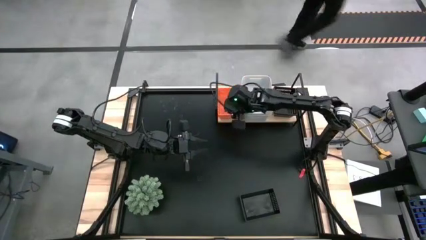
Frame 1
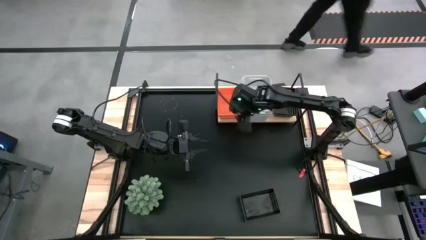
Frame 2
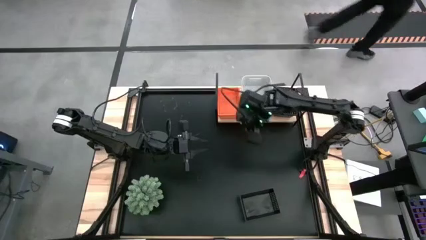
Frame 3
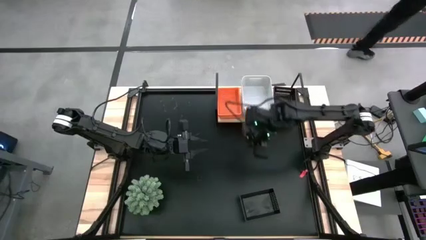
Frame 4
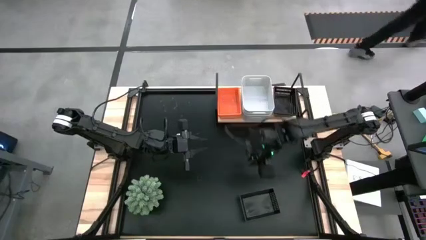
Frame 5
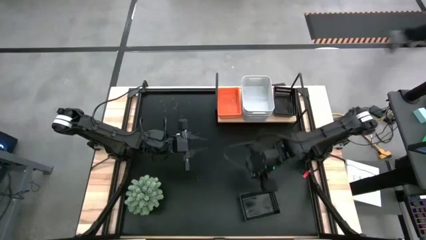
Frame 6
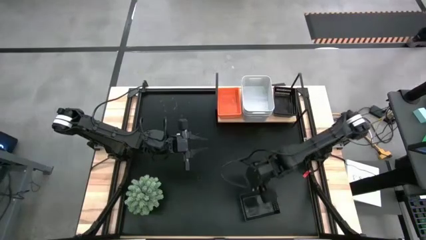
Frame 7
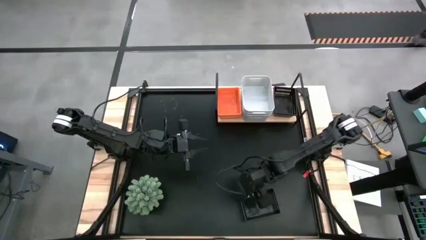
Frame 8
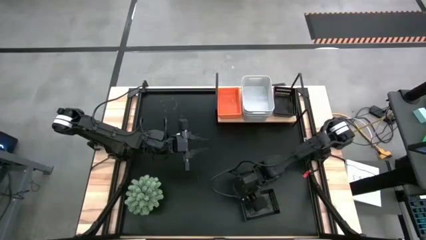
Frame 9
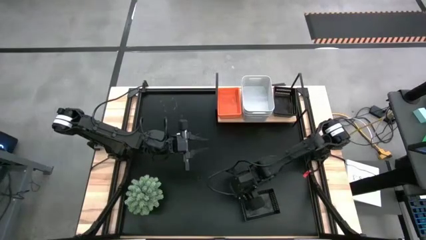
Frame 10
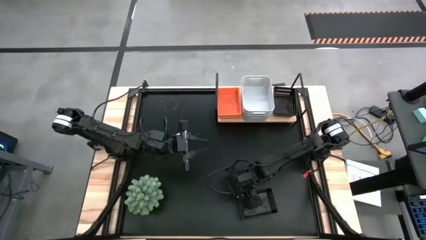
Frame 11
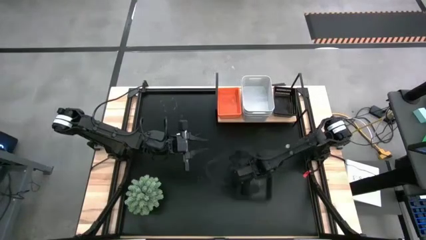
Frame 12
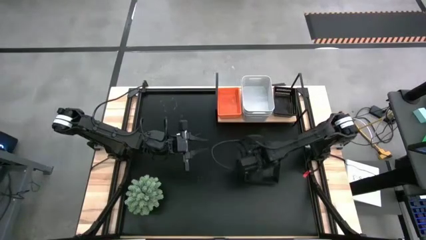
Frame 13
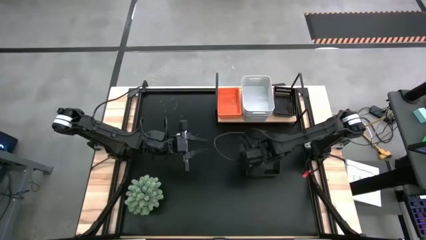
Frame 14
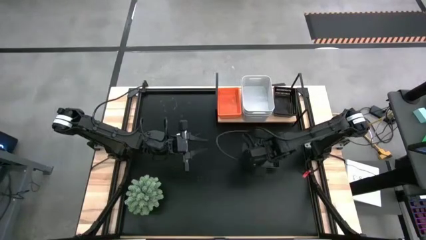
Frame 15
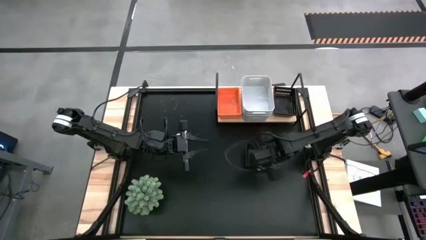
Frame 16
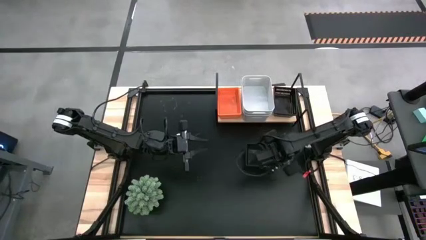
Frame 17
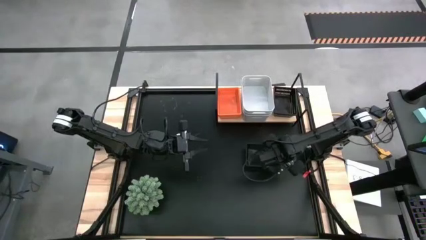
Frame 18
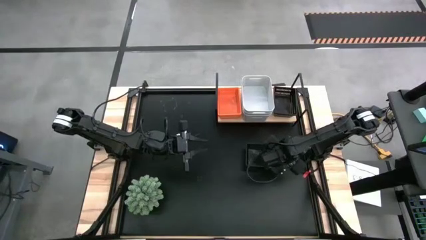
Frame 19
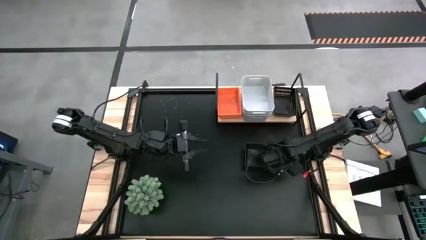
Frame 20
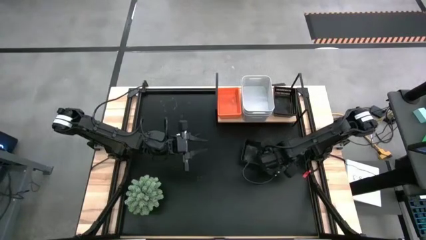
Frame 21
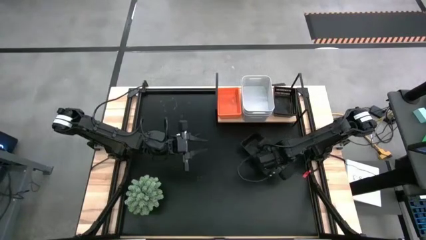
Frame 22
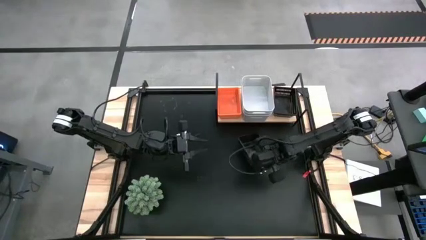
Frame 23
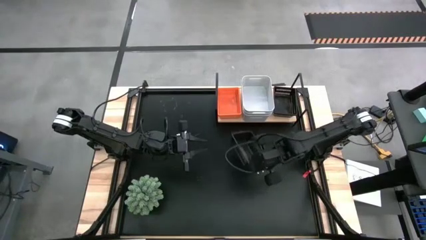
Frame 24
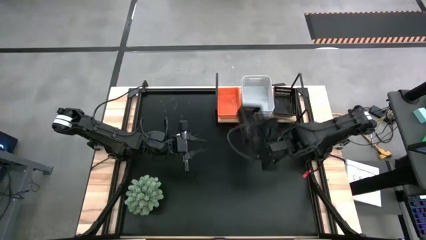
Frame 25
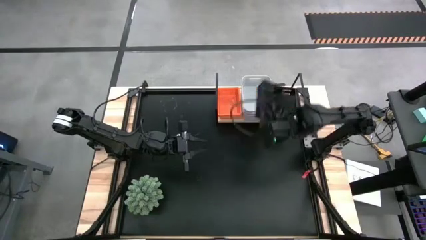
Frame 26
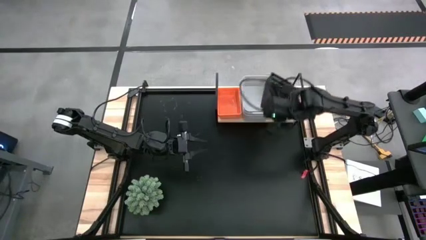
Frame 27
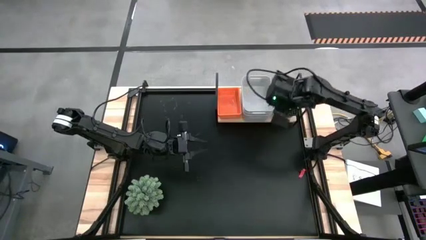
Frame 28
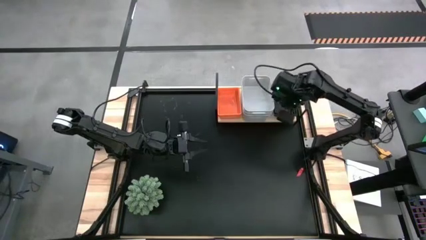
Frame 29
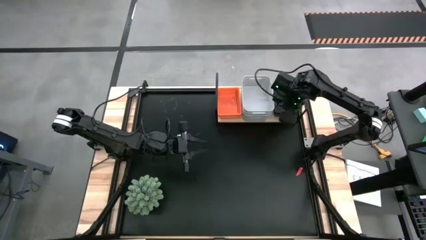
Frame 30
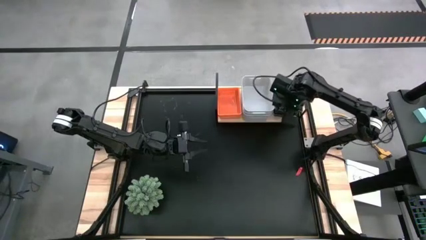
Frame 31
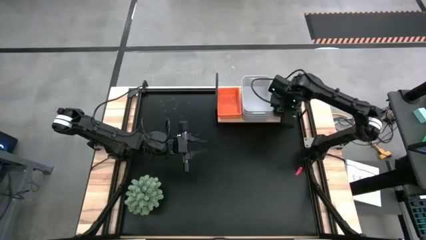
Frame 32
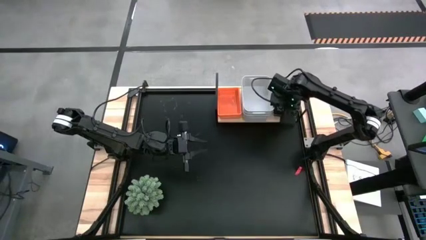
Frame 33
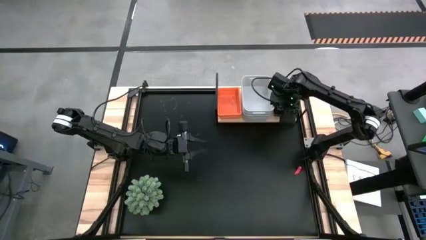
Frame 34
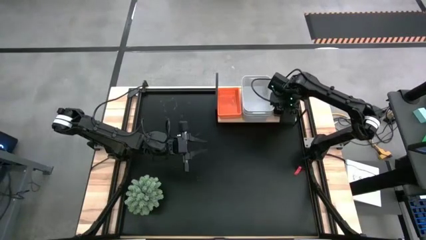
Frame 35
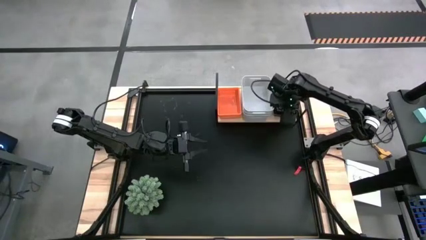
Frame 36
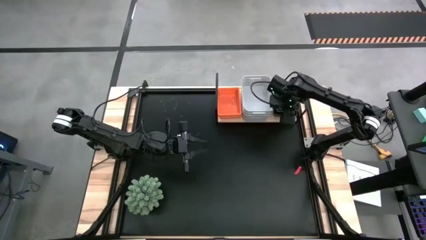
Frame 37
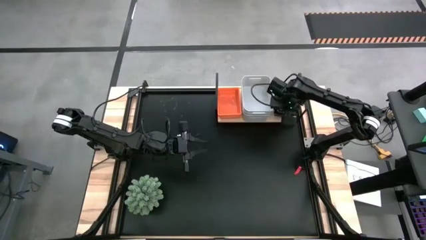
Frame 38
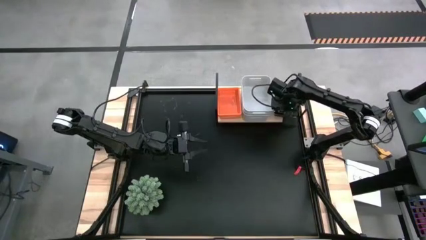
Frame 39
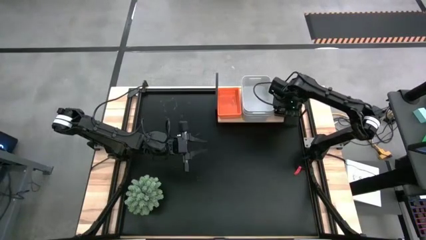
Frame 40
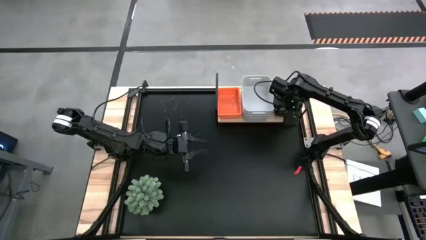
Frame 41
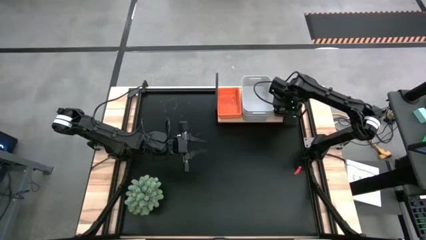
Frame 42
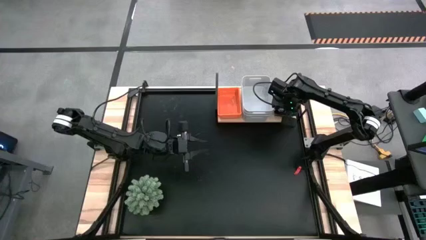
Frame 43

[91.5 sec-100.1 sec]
Task: Stack baskets on shelf by color
Stack the black bin on top of the black bin on the shelf

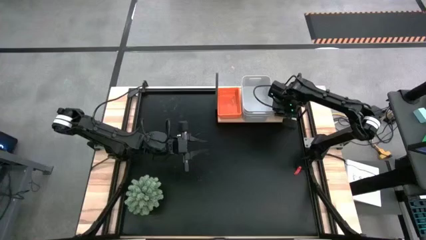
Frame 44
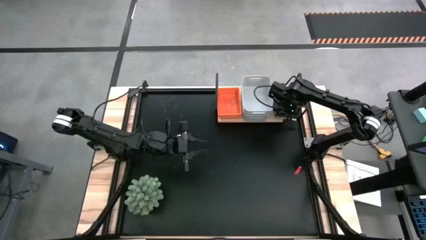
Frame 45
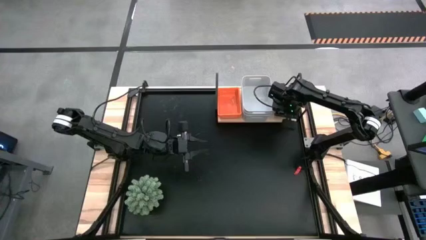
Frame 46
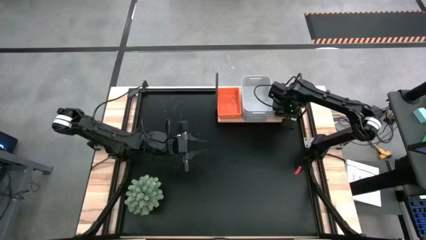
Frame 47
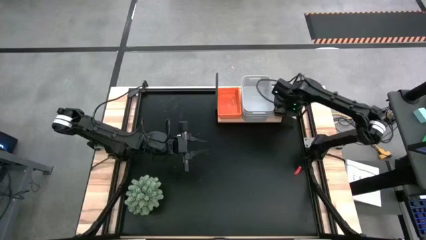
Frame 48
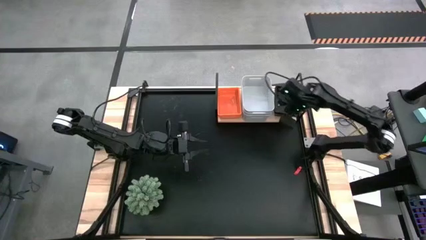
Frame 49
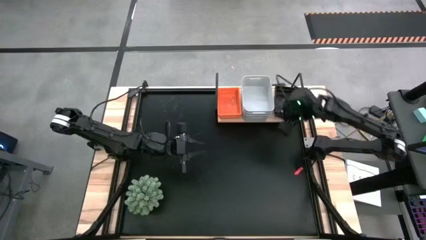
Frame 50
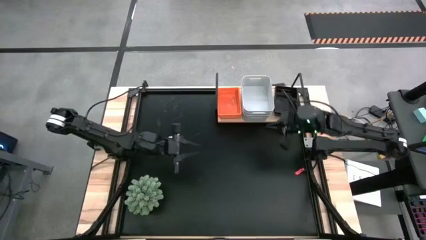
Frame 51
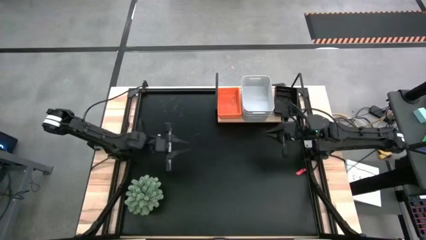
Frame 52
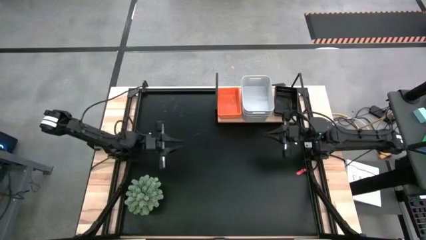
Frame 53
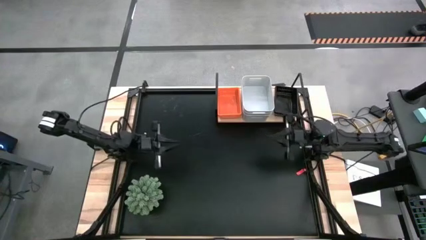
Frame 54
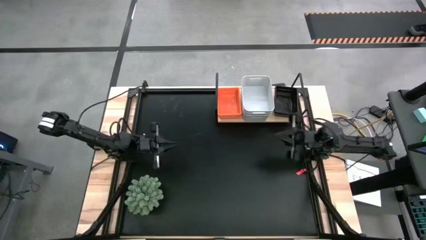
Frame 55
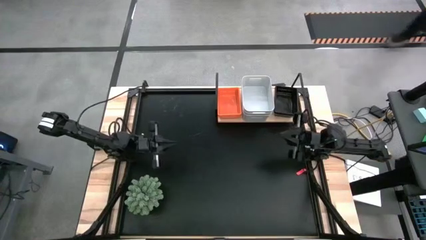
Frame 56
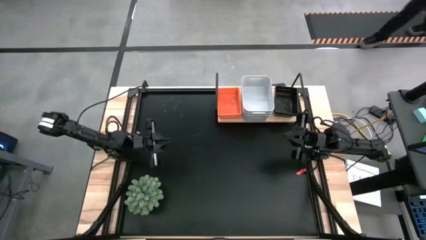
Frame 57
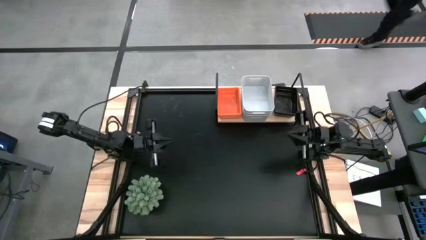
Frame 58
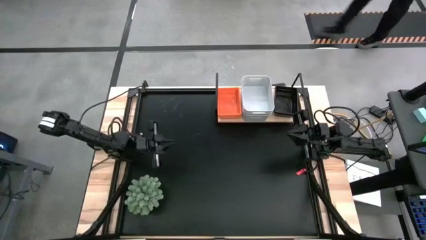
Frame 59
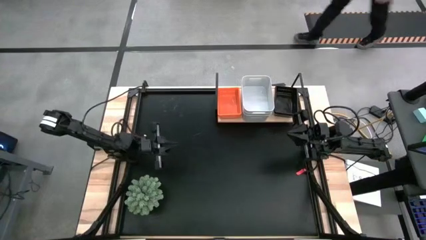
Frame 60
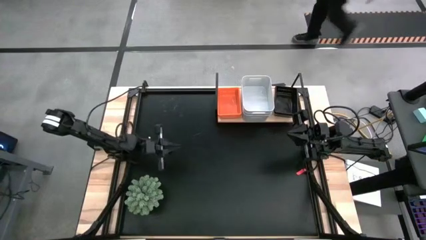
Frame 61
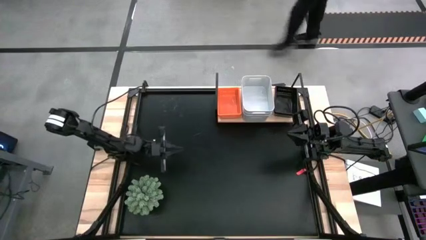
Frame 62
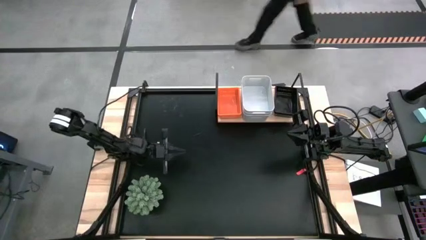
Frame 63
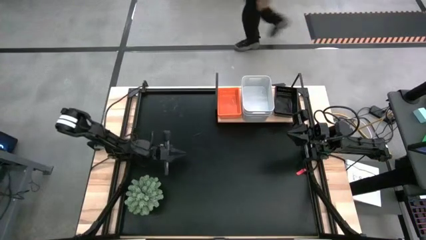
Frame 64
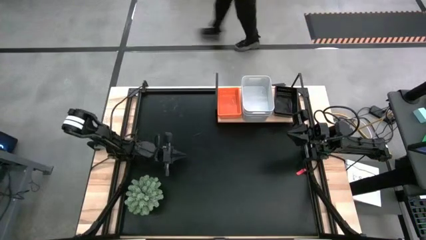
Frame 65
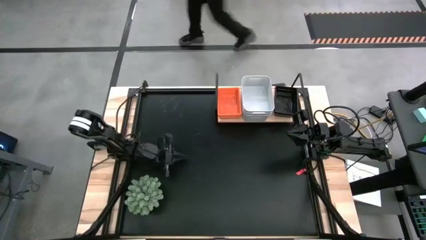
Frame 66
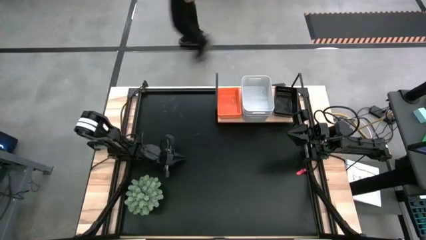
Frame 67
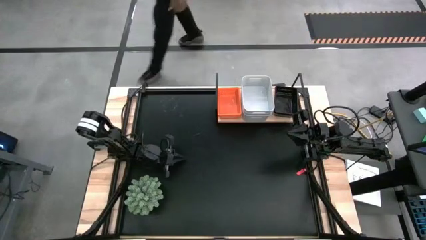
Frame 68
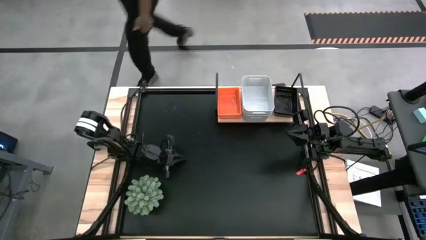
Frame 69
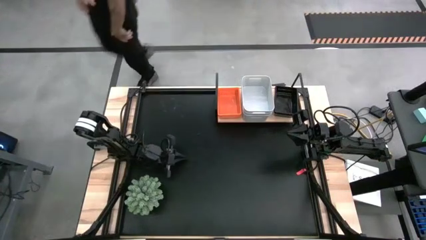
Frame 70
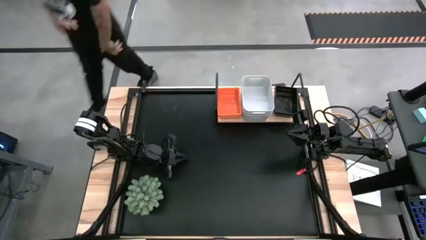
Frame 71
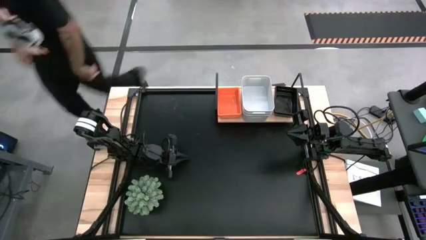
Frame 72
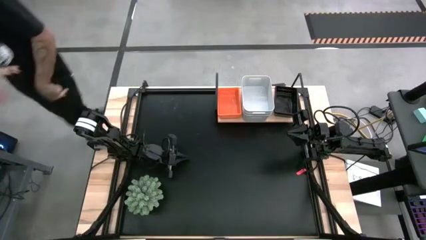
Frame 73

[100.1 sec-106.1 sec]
Return to Home Position
